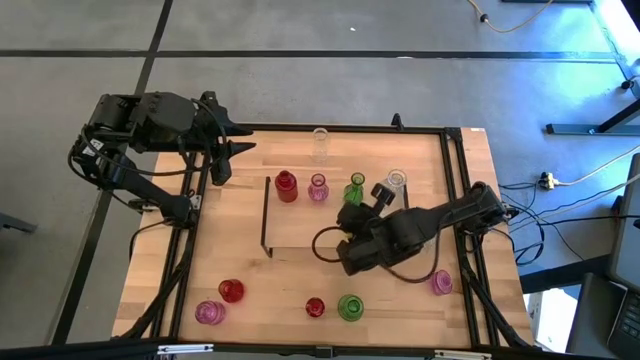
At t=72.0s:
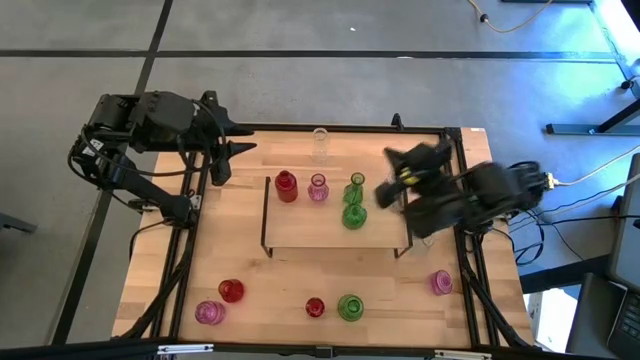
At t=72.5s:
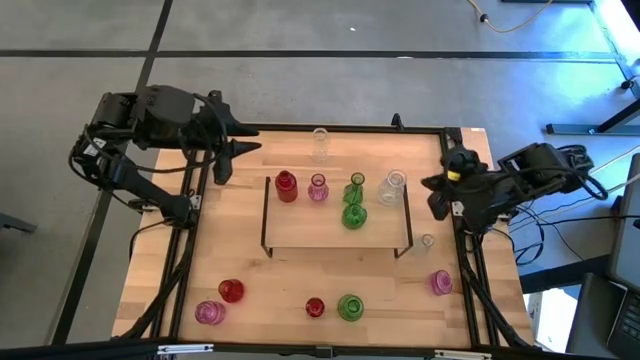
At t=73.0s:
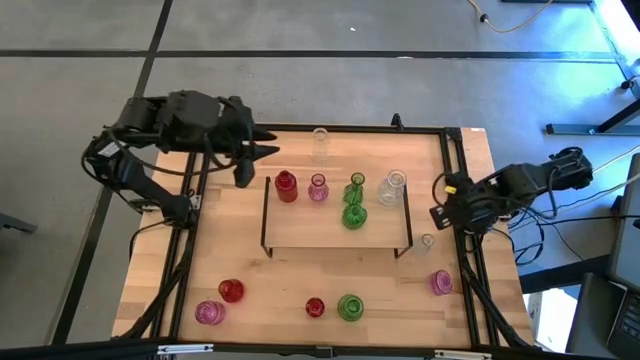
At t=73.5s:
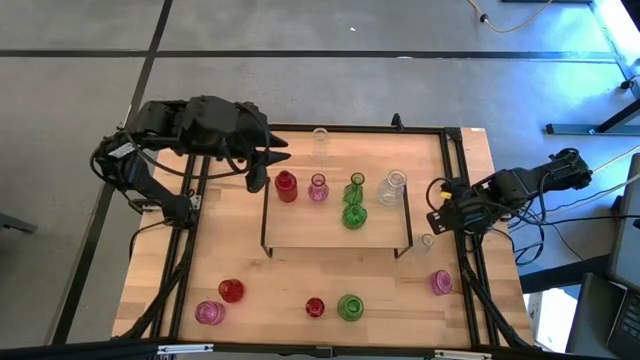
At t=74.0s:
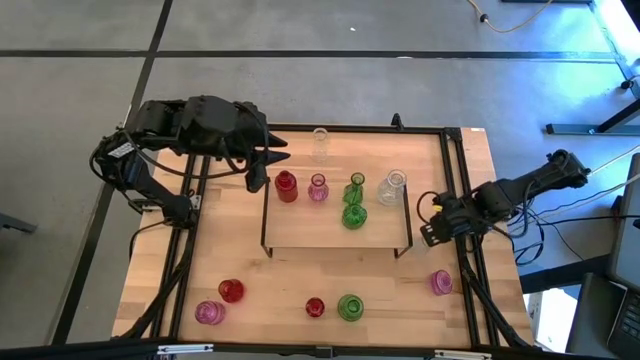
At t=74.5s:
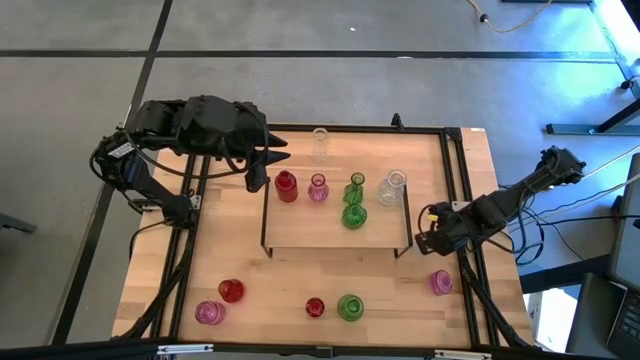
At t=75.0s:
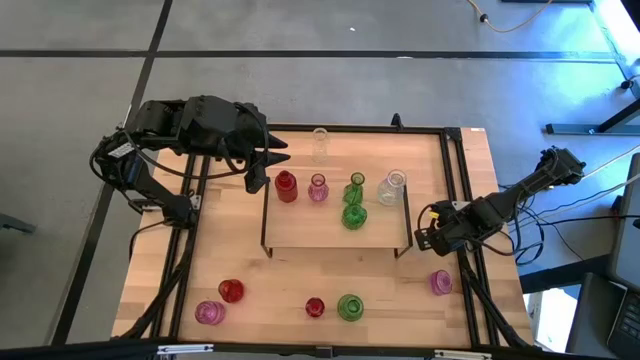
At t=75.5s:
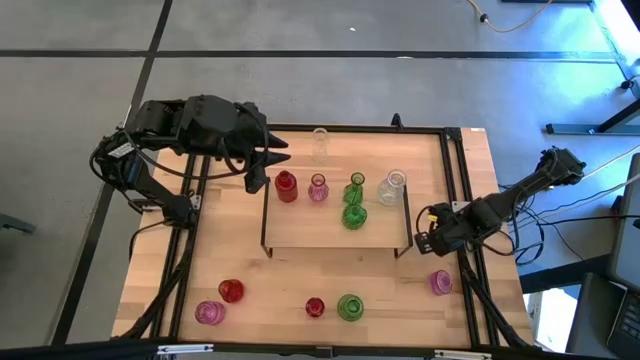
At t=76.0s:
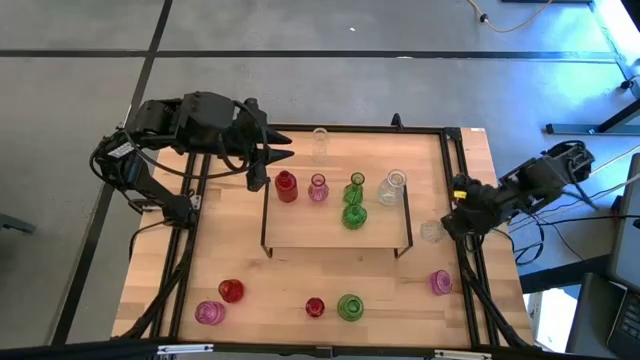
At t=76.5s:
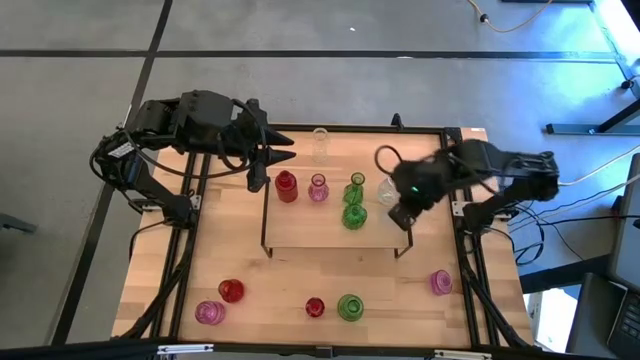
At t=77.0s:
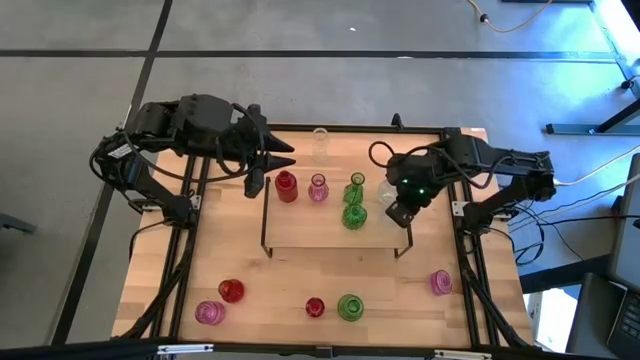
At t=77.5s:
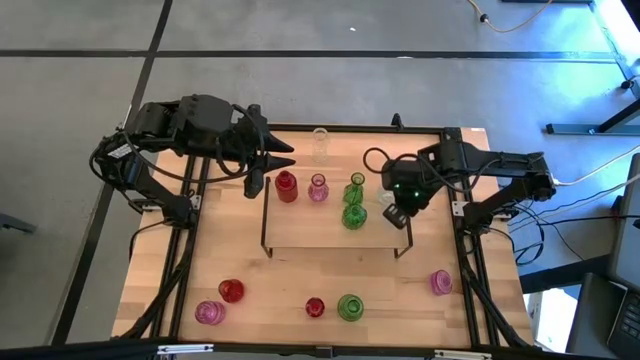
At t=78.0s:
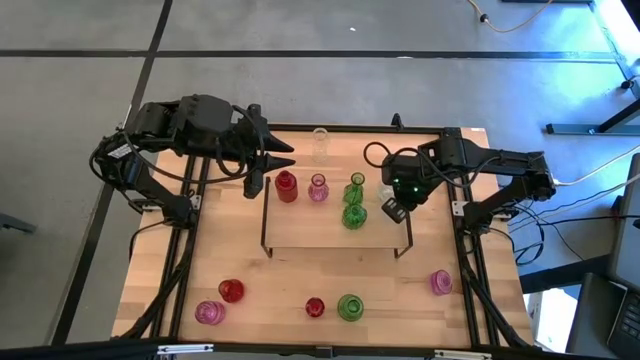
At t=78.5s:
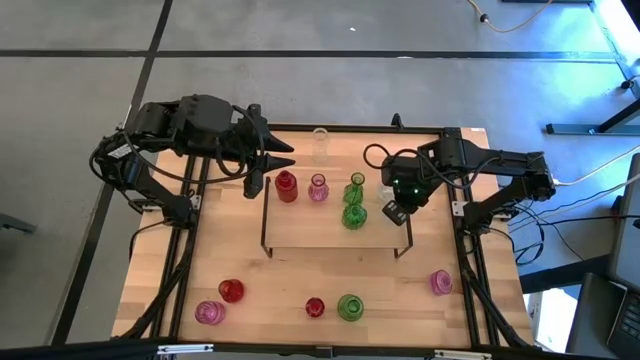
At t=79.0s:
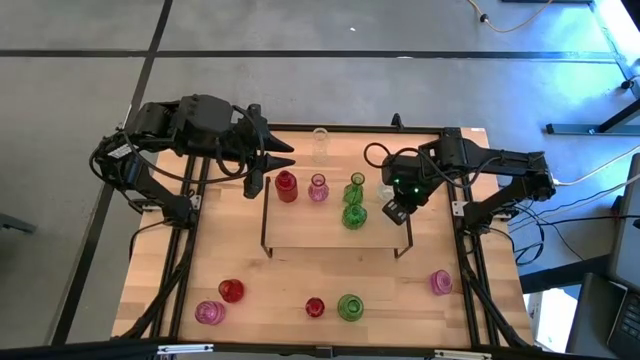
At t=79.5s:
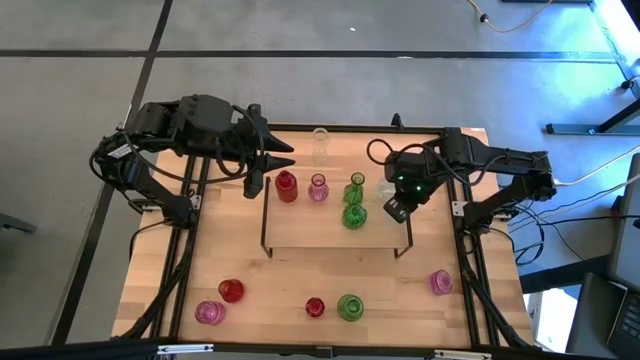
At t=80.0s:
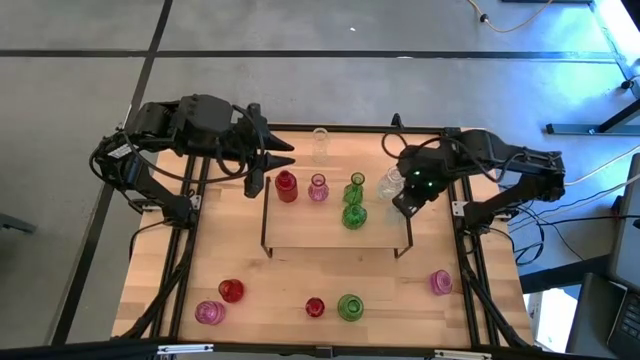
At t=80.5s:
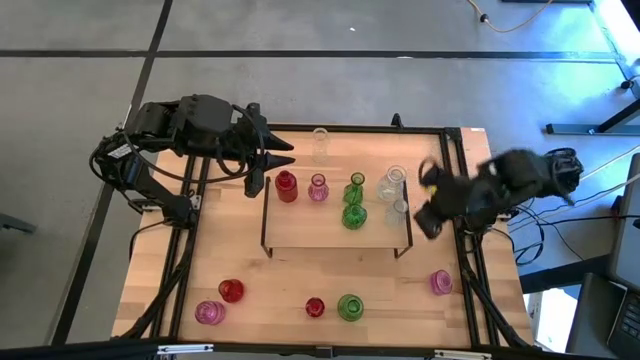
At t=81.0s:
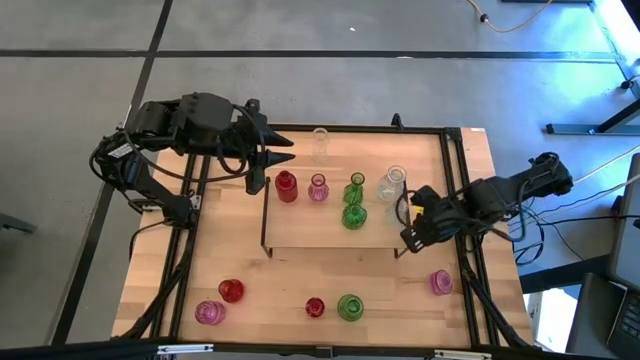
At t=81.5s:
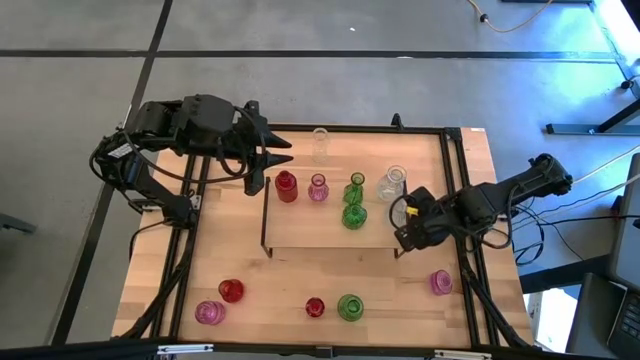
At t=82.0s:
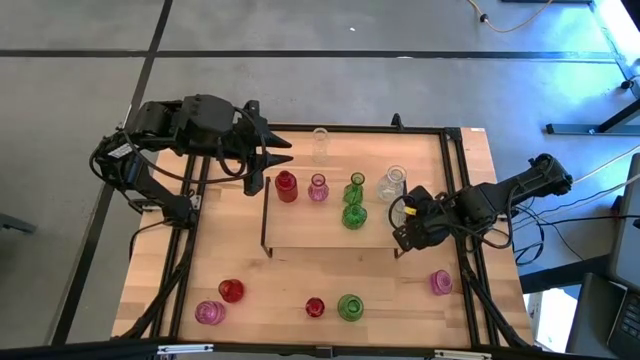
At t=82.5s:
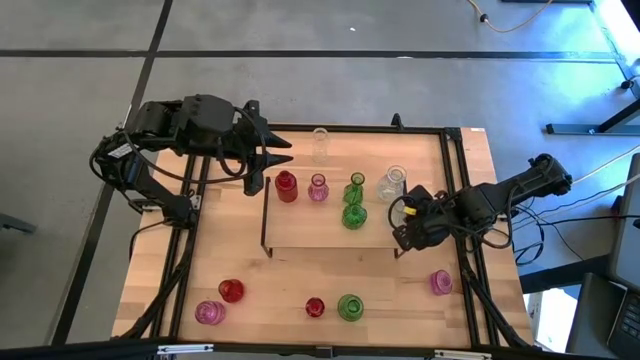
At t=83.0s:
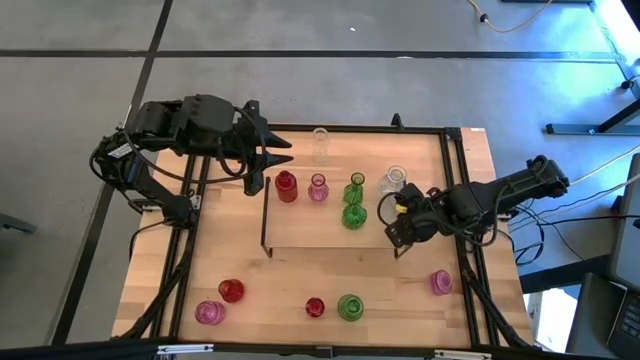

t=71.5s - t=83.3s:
Task: sort vases onto shelf
Put the bottom transparent vase on the shelf aligned with the other transparent vase

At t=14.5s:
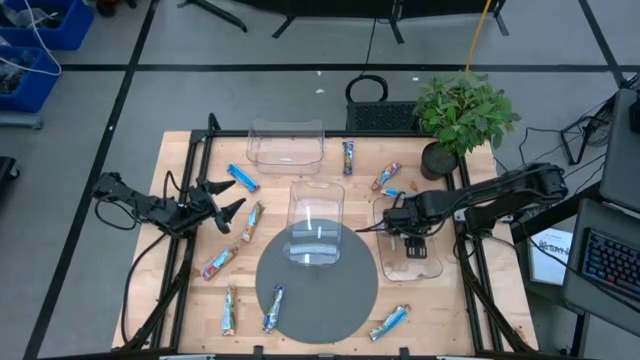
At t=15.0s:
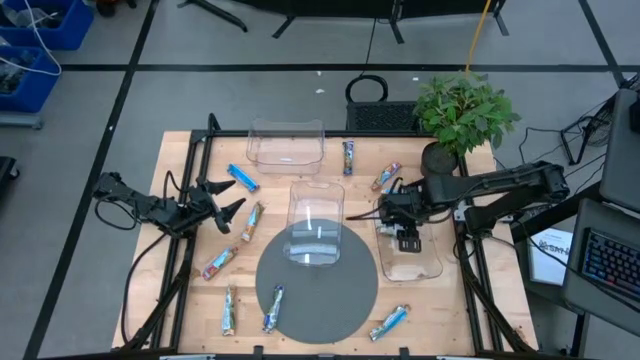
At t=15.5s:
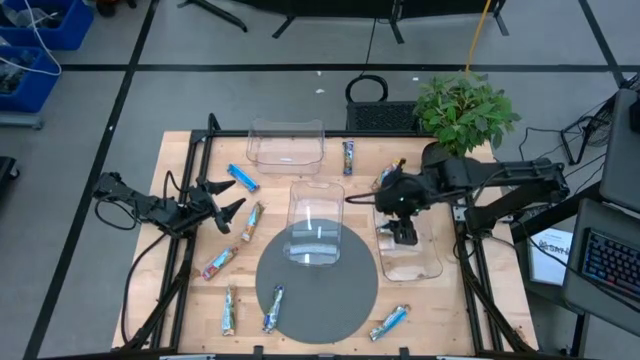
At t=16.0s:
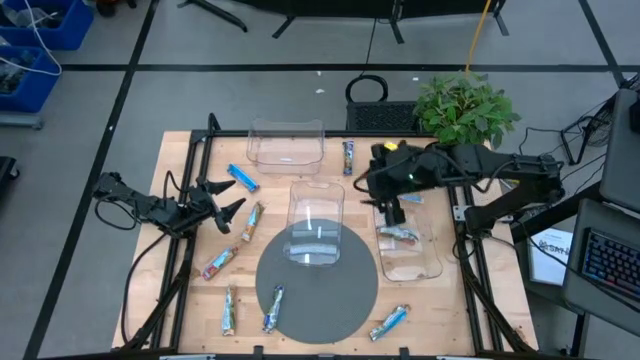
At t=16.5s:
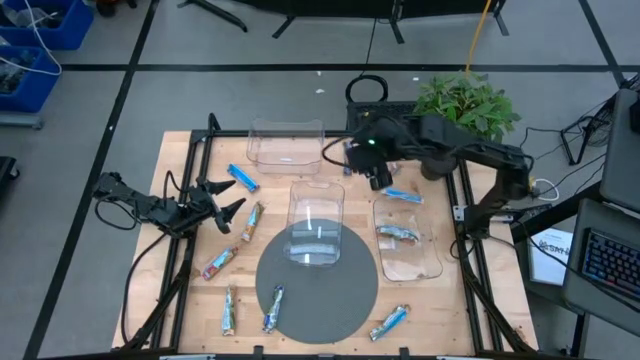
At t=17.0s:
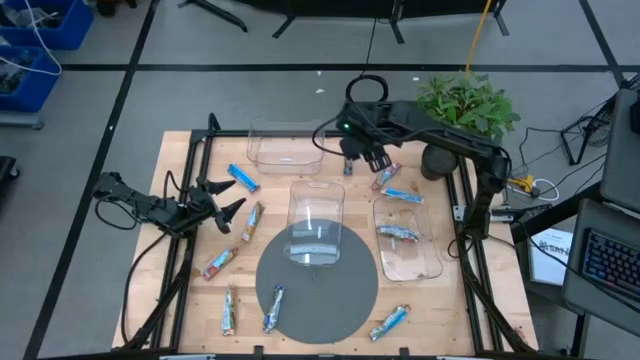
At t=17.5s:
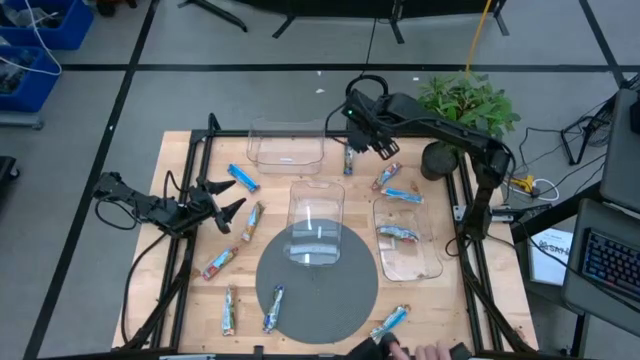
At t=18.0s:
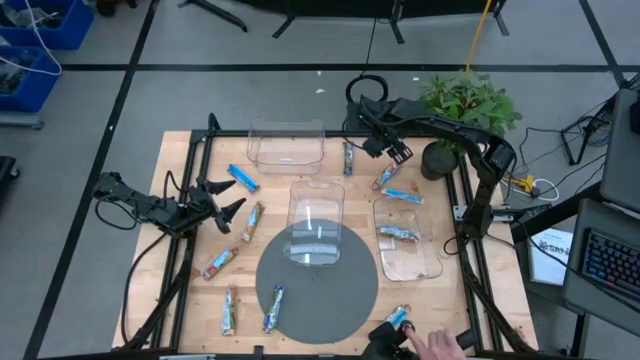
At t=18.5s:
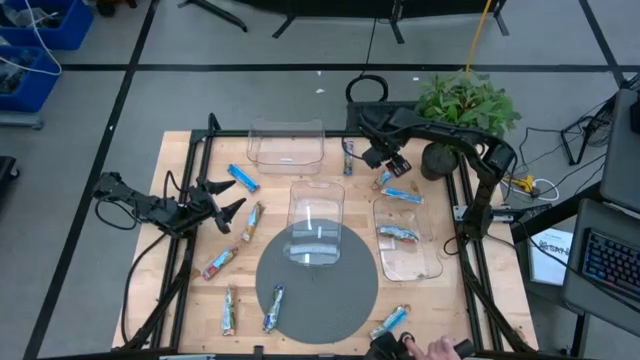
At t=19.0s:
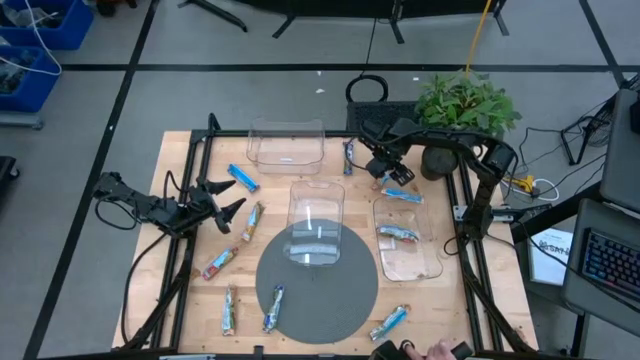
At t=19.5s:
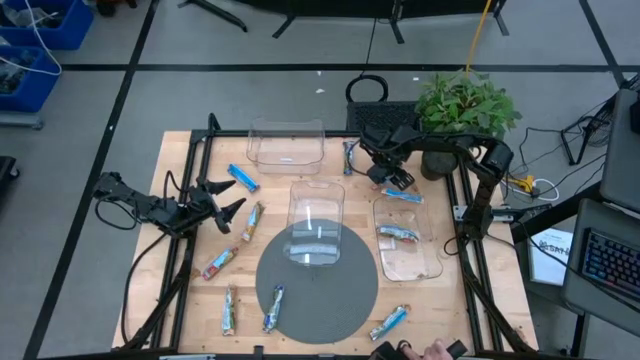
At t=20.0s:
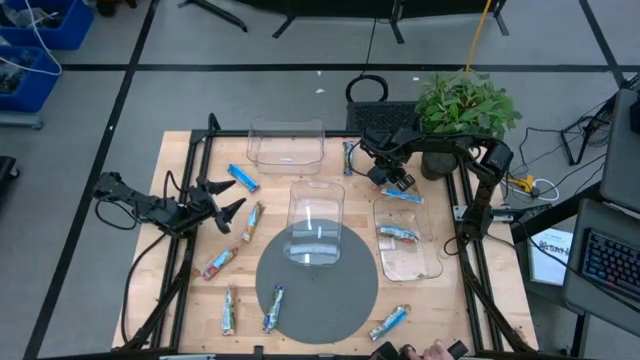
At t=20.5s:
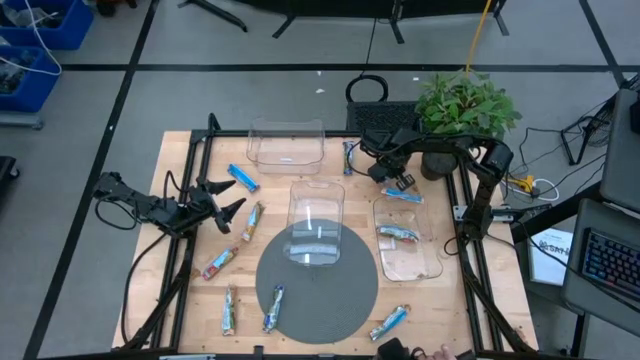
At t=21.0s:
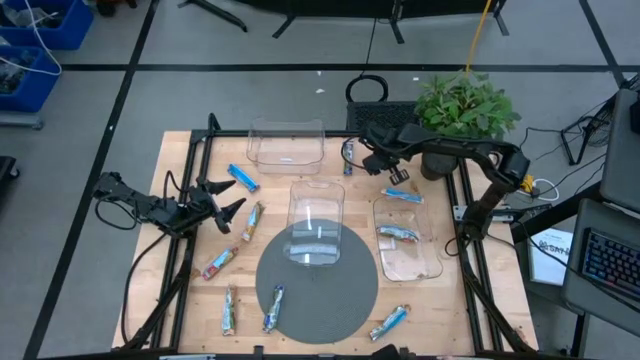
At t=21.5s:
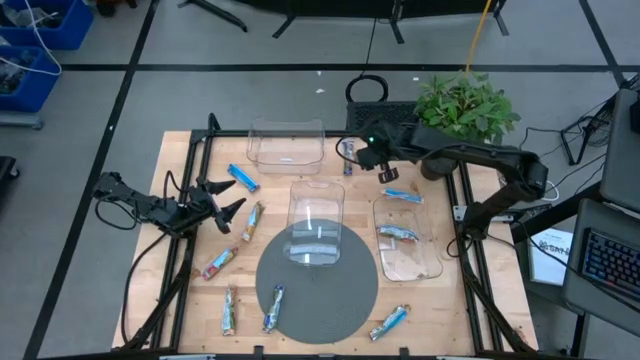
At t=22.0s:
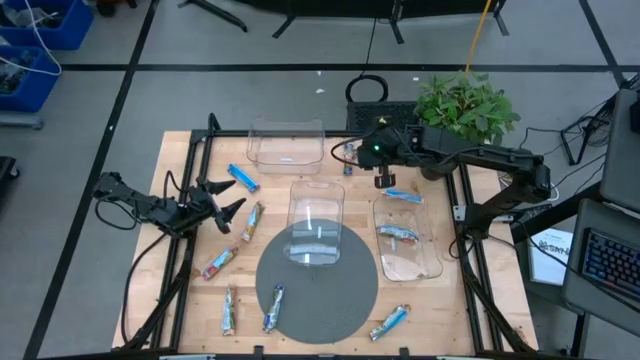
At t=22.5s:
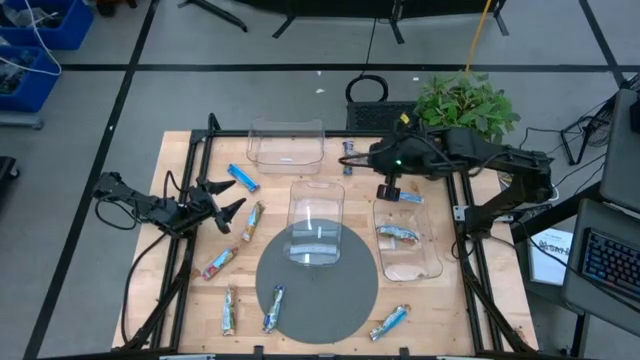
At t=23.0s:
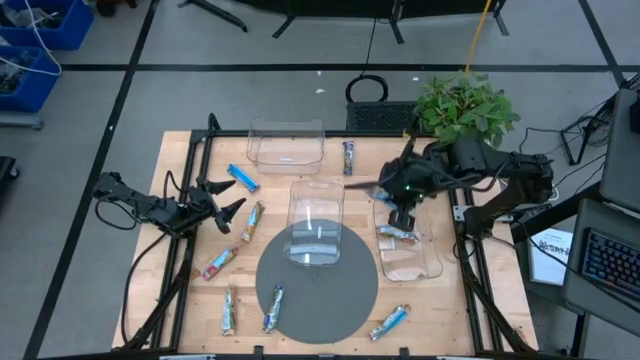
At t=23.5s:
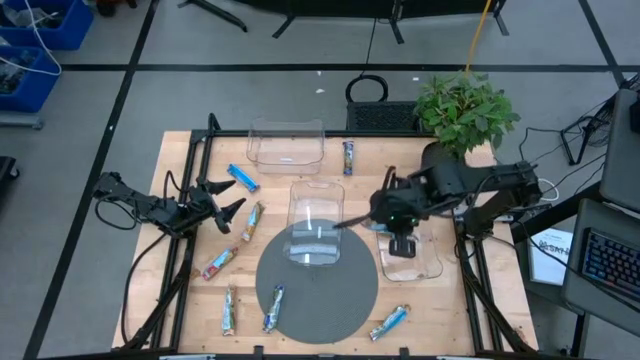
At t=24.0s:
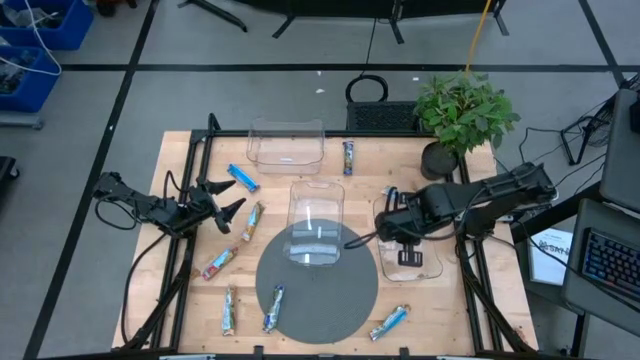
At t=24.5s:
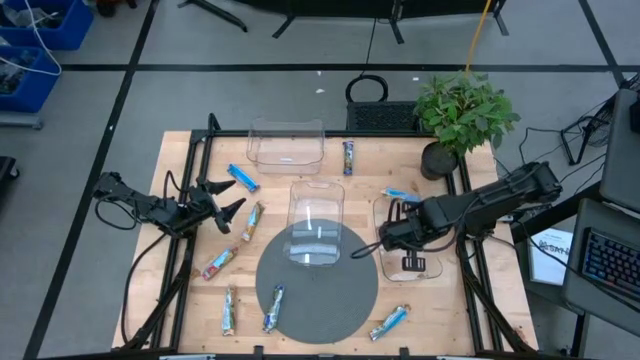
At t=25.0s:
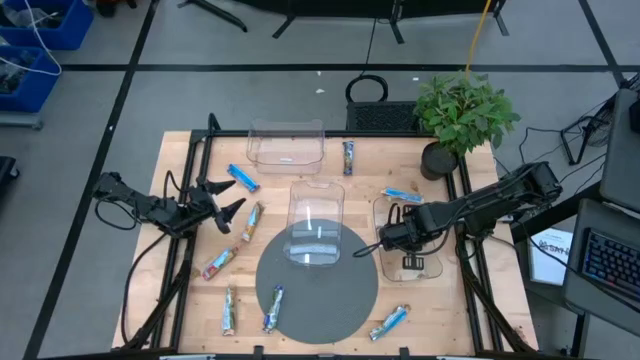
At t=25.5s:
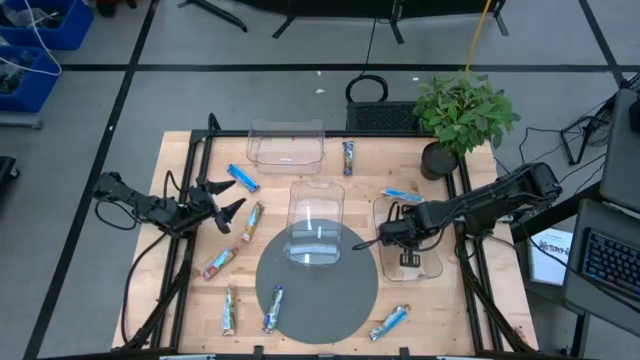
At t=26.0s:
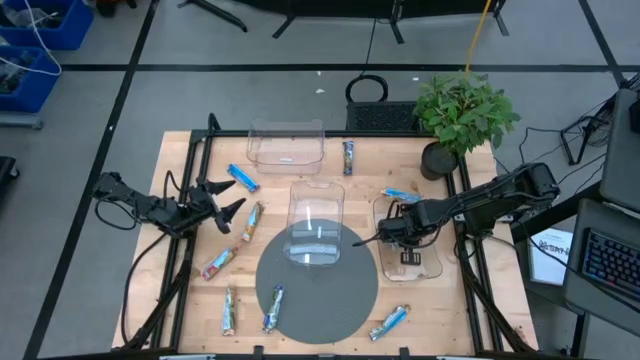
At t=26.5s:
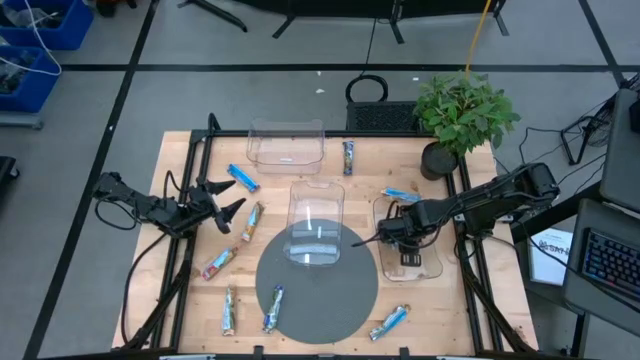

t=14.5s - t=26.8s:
Task: Pick and place Granola Bars by type
Put the red granola bar into the bottom right transparent bin
